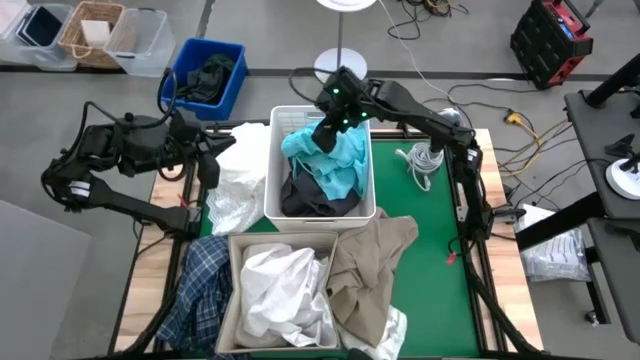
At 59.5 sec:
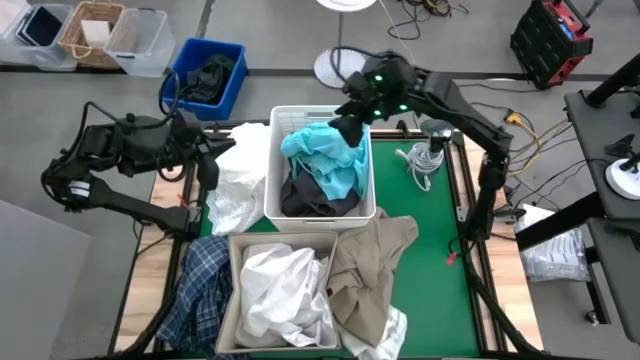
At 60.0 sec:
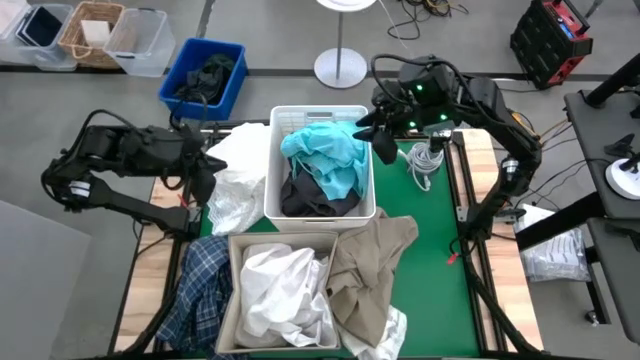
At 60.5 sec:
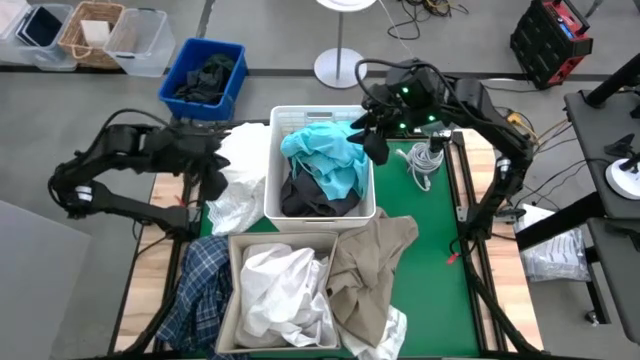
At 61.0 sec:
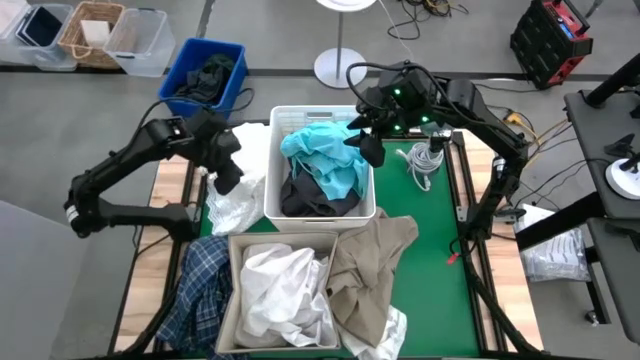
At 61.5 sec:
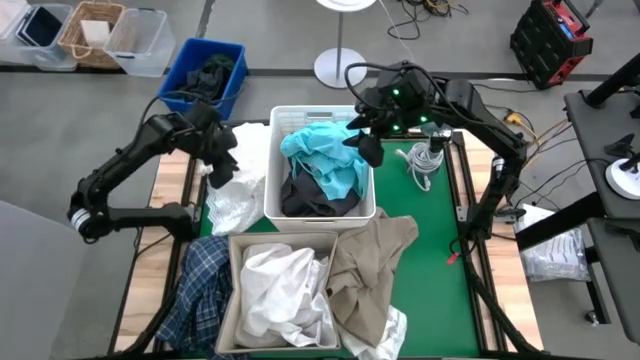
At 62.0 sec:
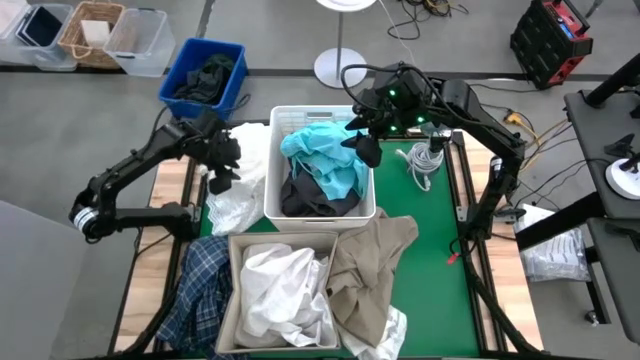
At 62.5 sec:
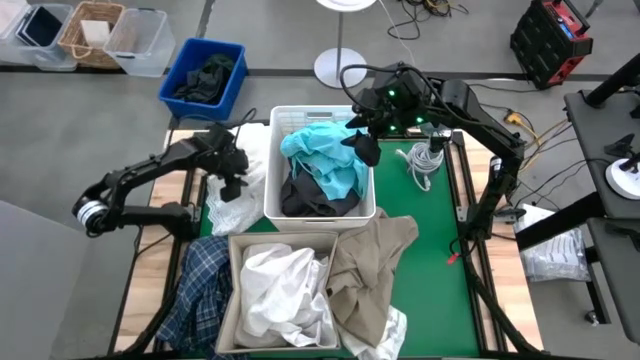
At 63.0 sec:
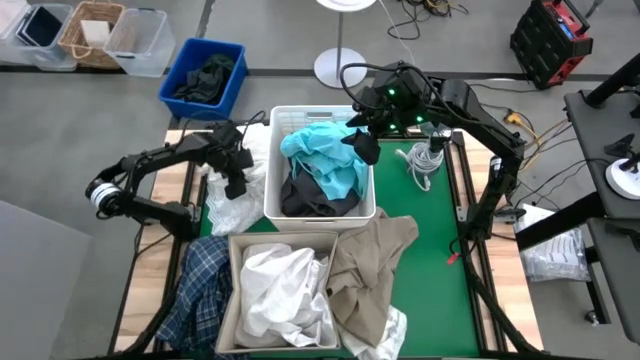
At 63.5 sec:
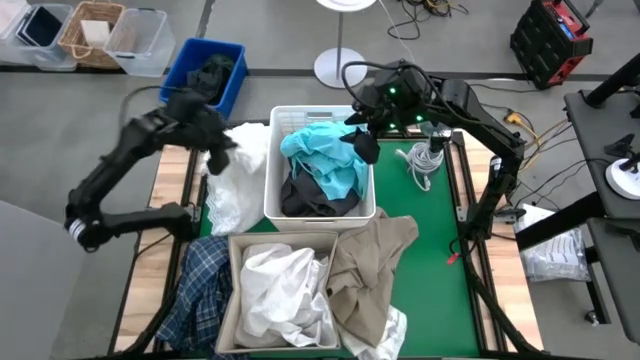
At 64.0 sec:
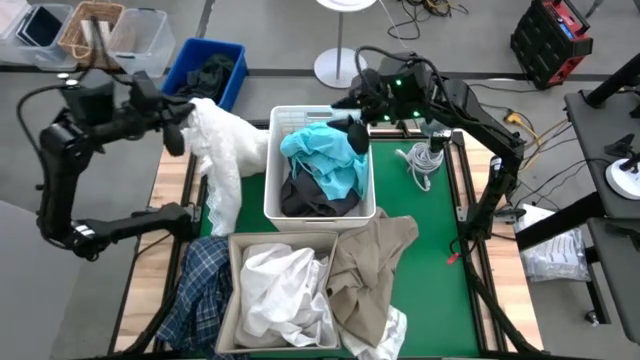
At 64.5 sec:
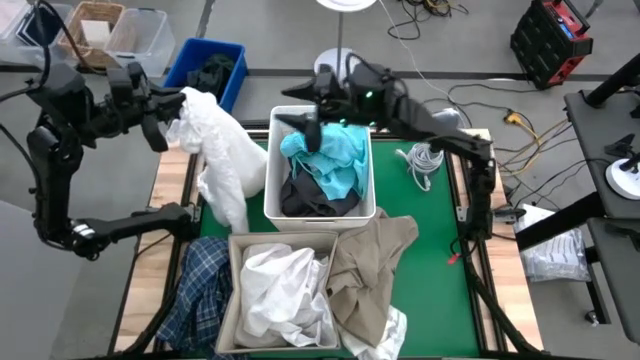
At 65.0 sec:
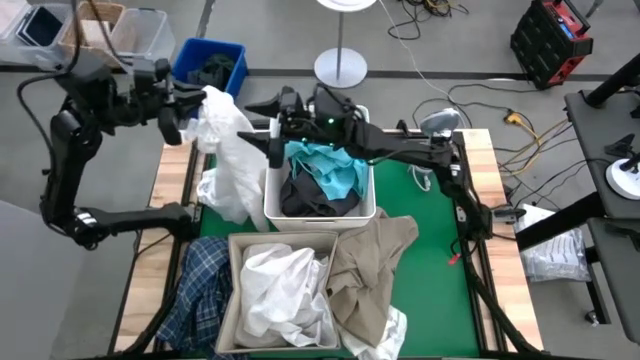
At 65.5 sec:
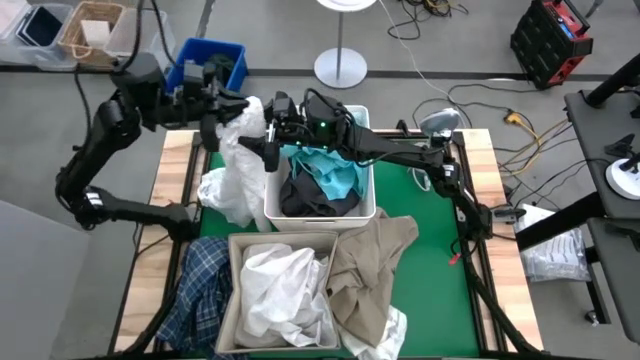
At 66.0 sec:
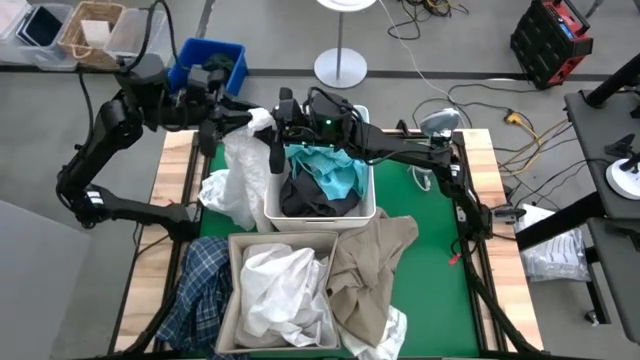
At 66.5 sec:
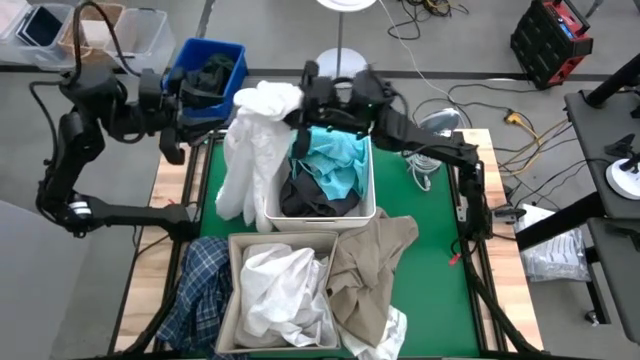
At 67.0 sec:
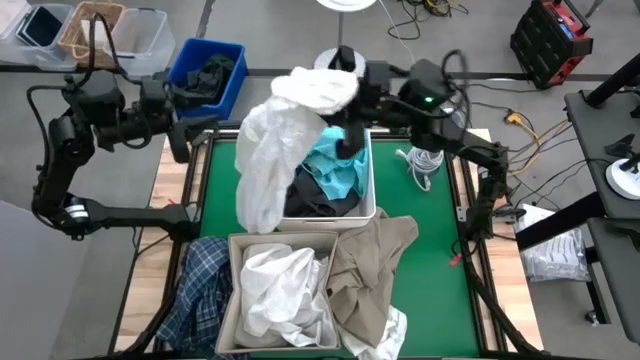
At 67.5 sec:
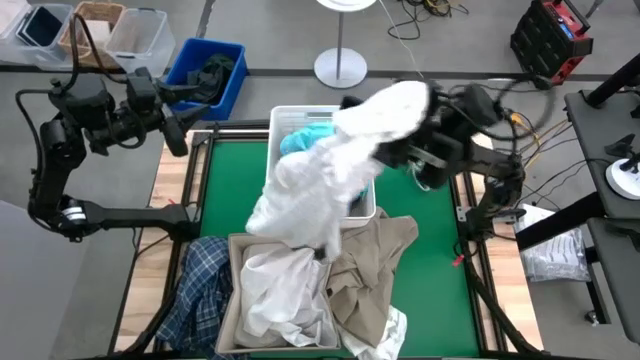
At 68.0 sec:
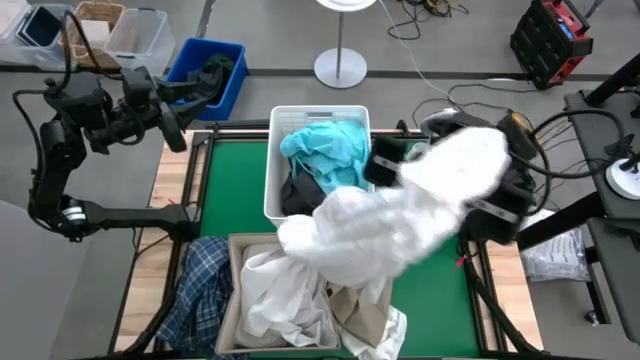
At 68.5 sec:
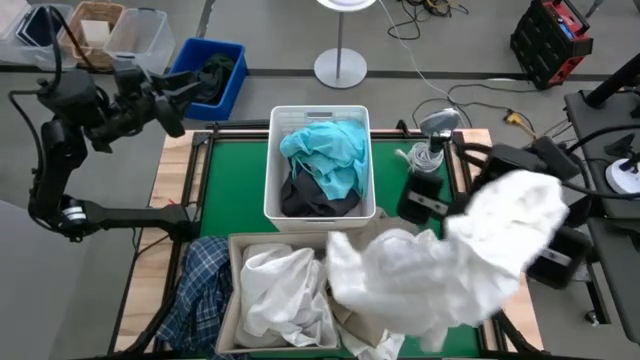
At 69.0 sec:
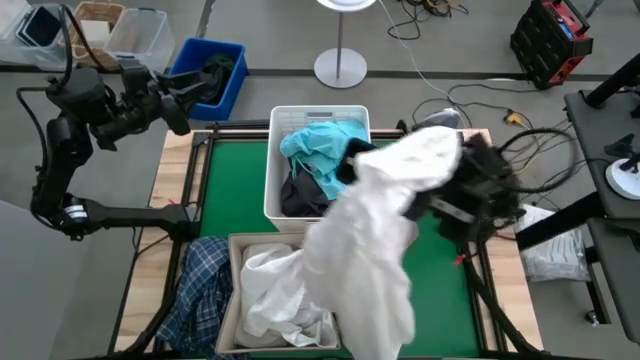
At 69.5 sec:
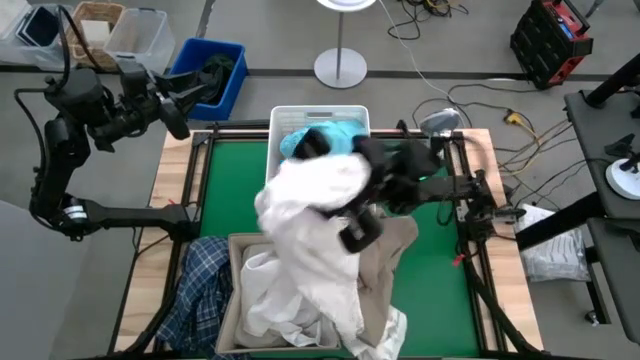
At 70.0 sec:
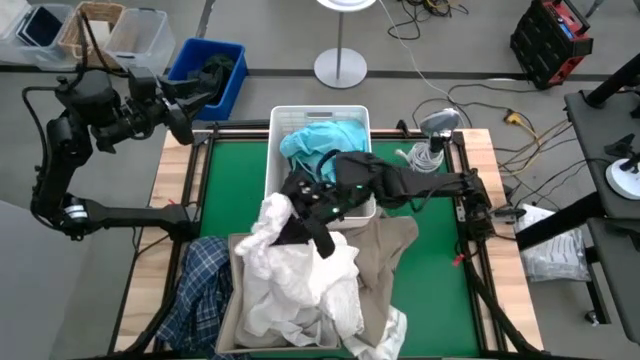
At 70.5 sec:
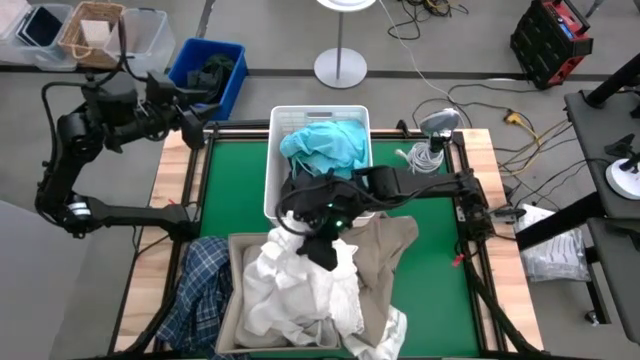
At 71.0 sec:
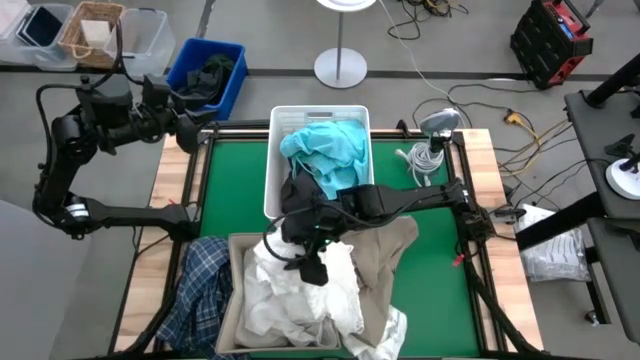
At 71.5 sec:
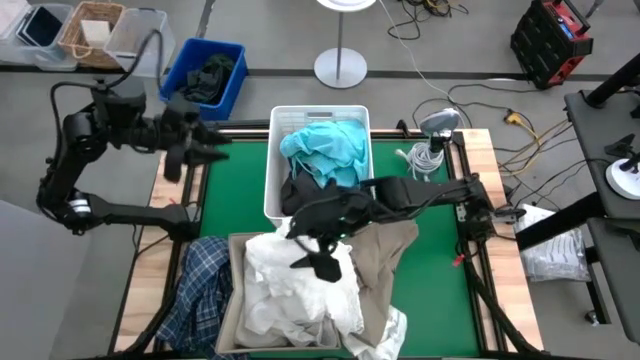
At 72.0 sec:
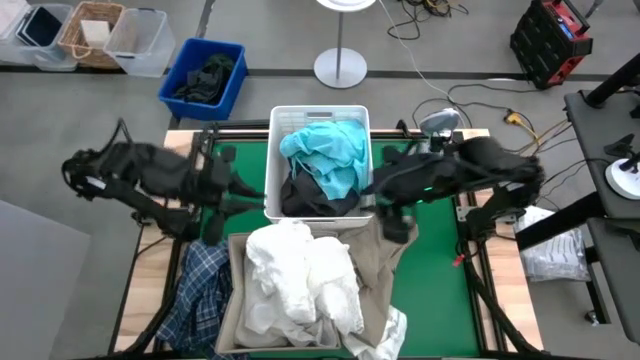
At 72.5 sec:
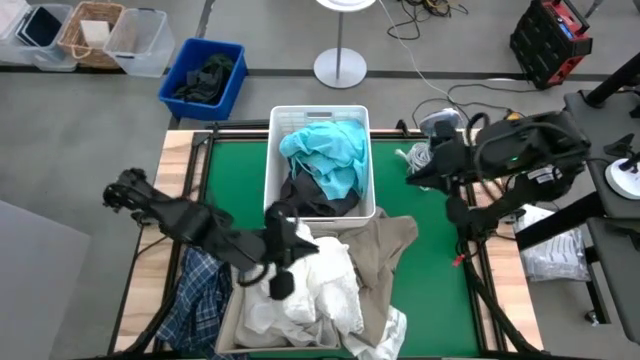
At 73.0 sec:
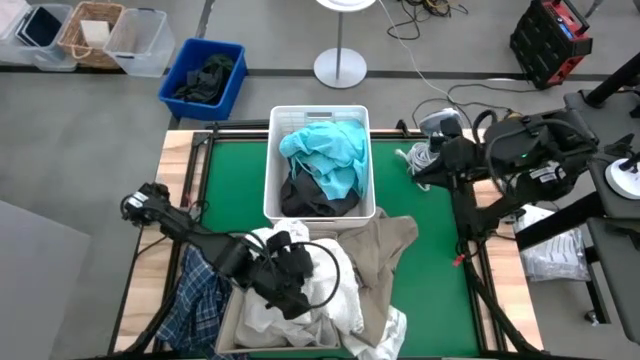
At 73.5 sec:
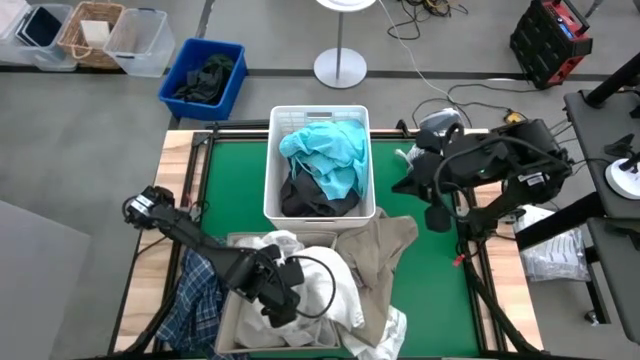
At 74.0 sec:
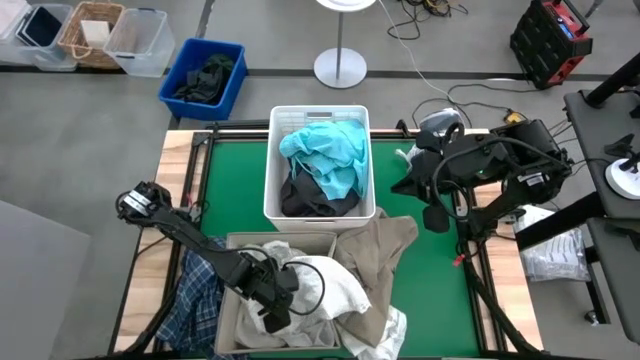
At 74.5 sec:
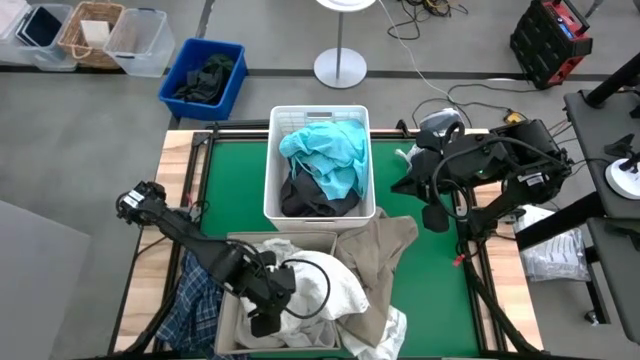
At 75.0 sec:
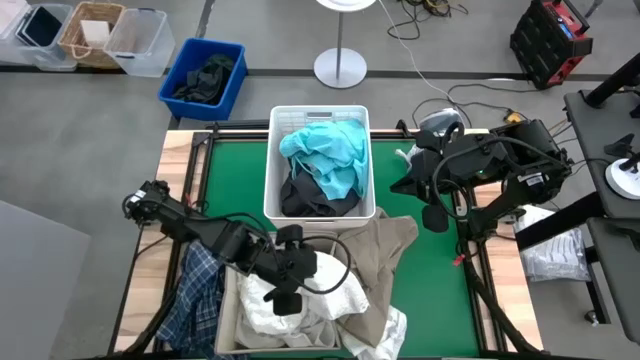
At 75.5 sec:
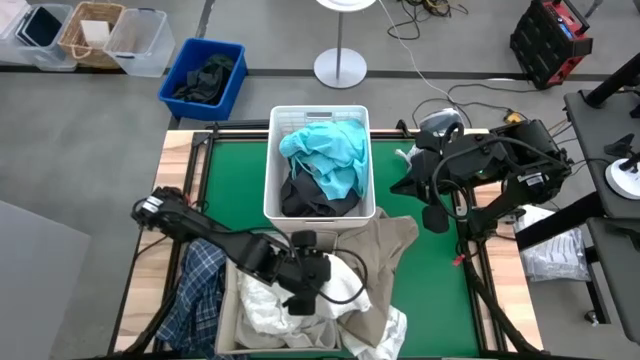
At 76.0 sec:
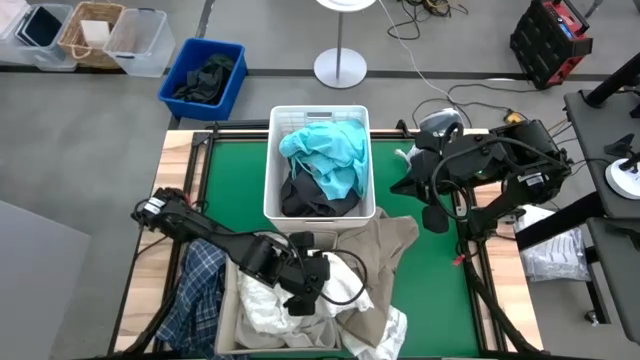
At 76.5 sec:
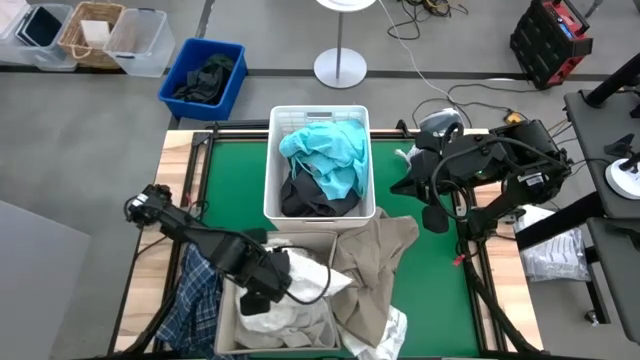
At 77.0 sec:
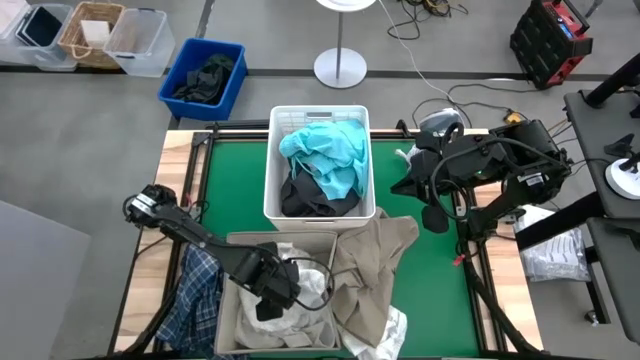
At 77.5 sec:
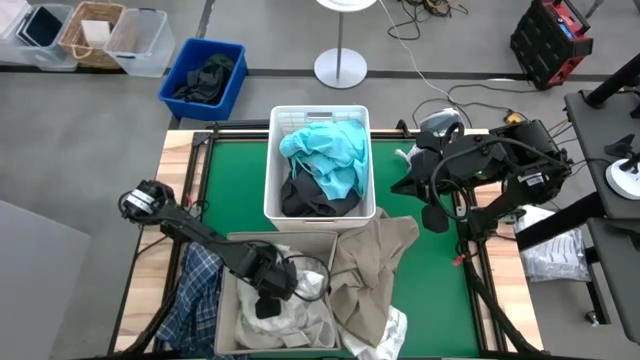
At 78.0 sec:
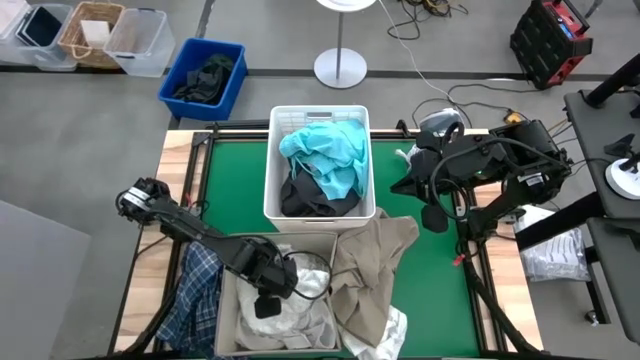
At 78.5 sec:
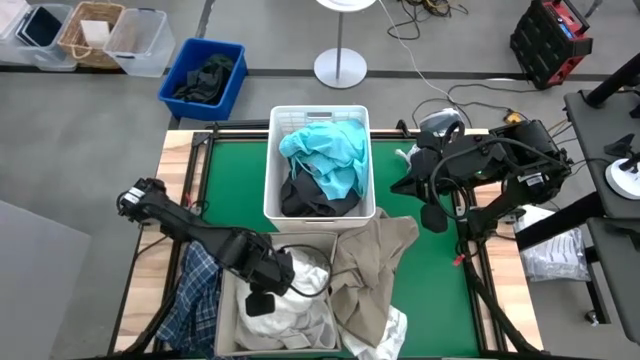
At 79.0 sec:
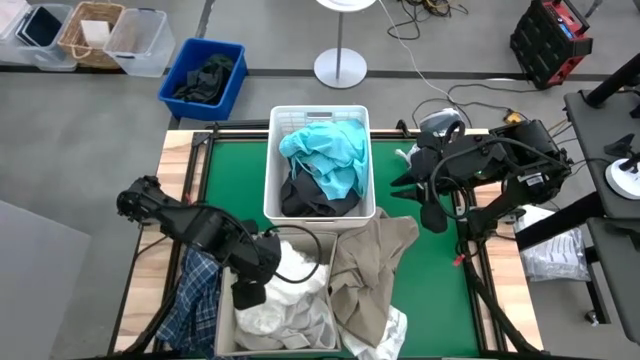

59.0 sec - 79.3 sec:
Task: Sort clothes
Put the white dress into the brown laundry organizer

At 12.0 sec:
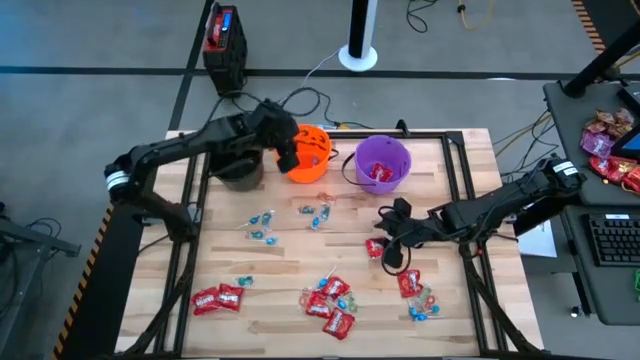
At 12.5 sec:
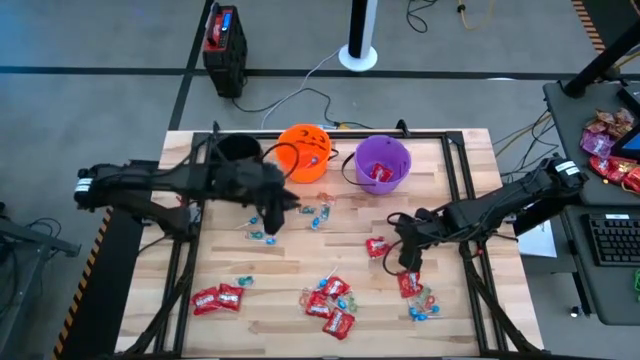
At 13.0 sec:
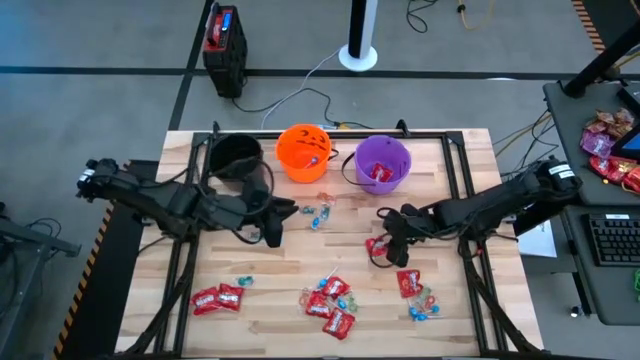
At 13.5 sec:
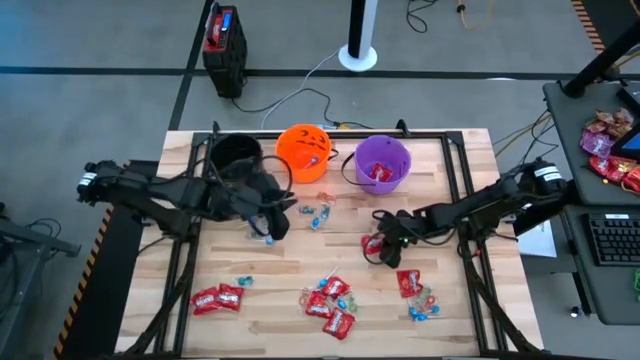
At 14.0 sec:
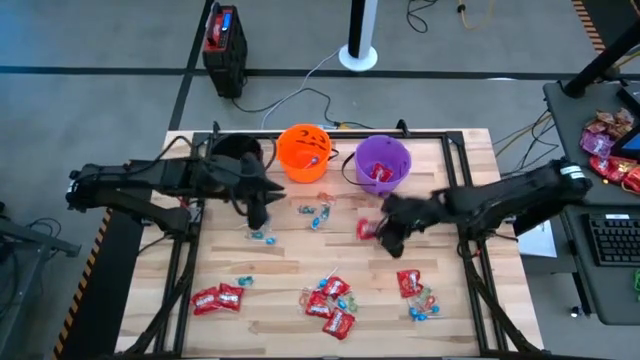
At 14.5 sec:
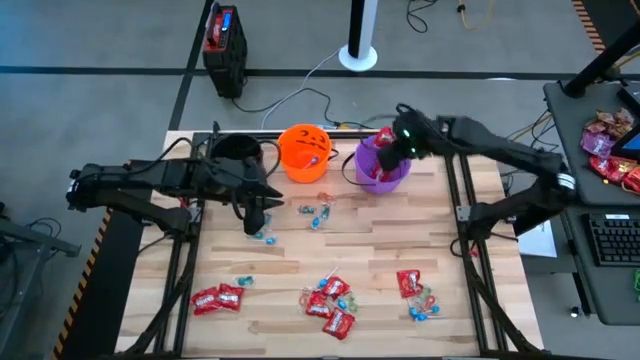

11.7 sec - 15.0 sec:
Task: Sort candy by brand, put in halloween buckets
Put the red candy into the violet bucket
